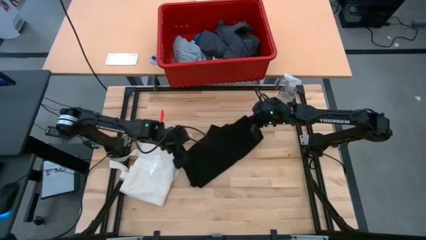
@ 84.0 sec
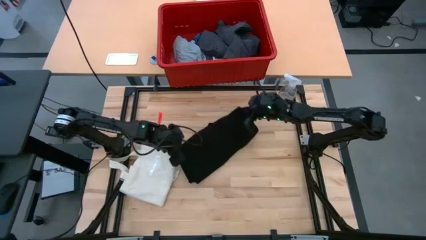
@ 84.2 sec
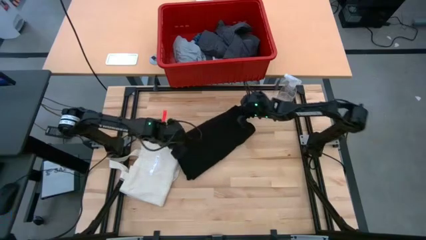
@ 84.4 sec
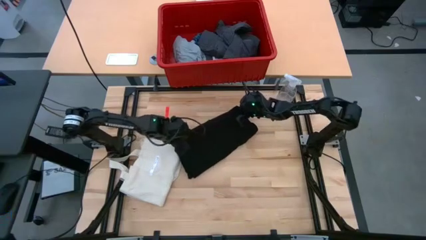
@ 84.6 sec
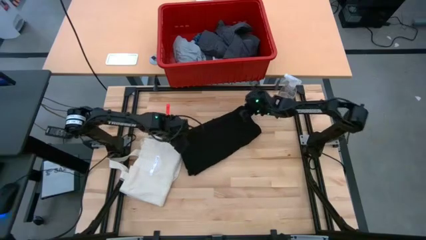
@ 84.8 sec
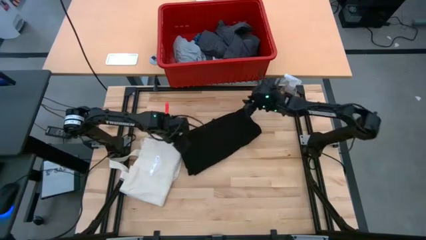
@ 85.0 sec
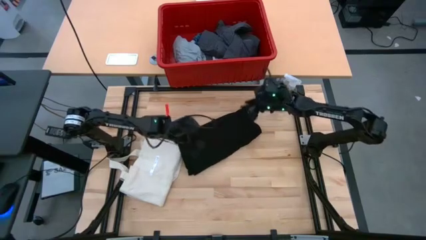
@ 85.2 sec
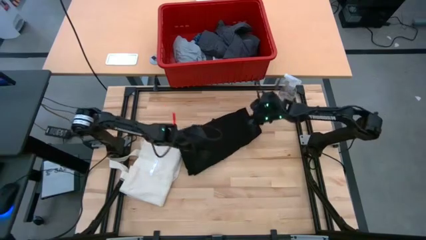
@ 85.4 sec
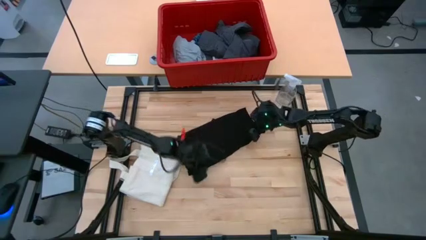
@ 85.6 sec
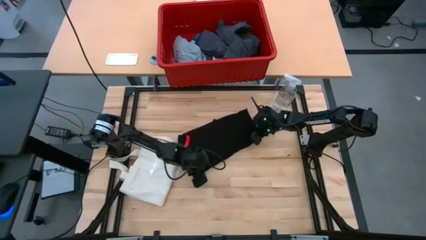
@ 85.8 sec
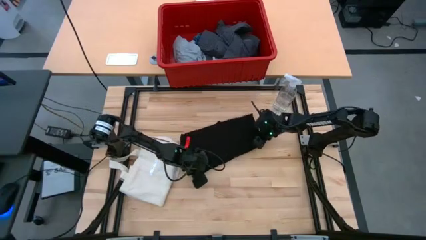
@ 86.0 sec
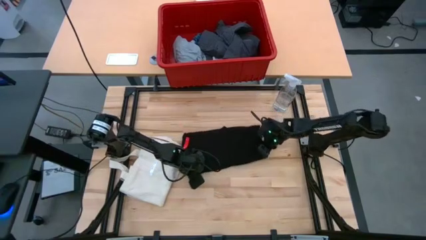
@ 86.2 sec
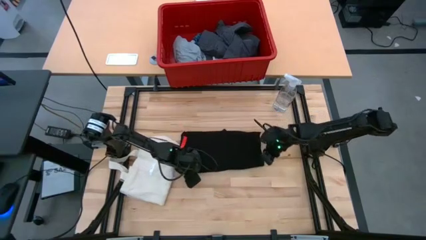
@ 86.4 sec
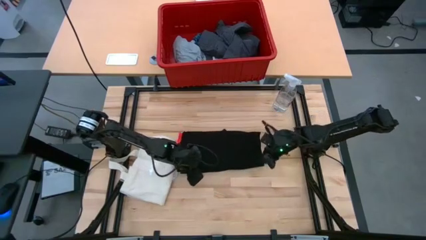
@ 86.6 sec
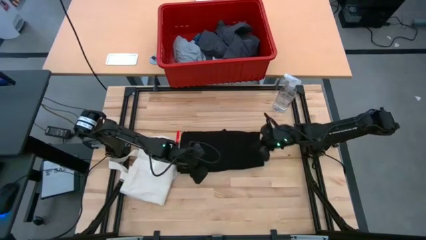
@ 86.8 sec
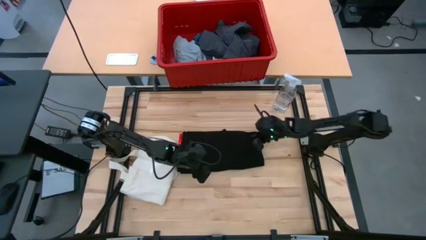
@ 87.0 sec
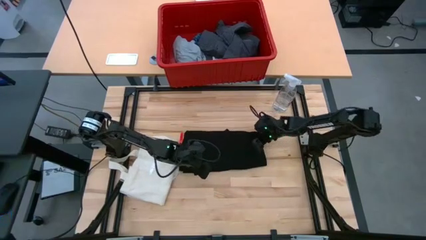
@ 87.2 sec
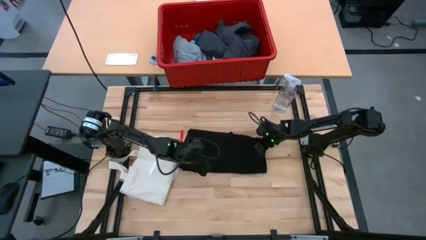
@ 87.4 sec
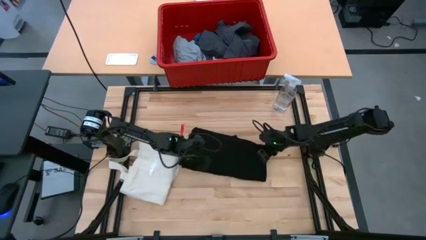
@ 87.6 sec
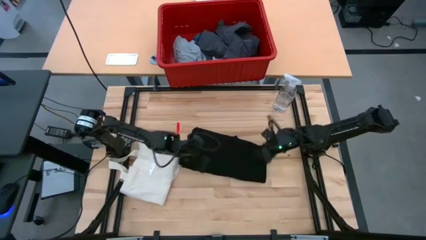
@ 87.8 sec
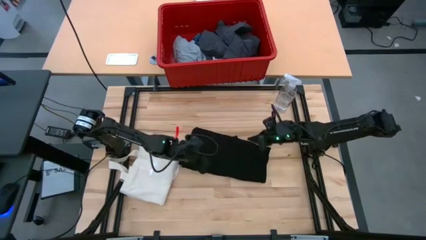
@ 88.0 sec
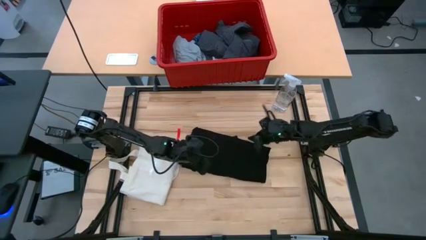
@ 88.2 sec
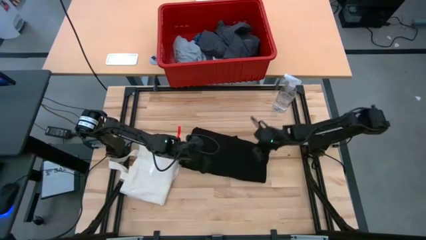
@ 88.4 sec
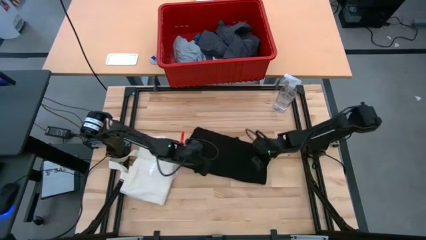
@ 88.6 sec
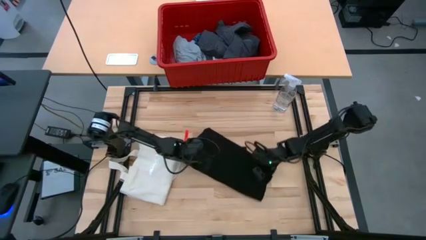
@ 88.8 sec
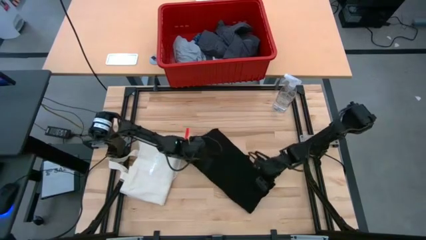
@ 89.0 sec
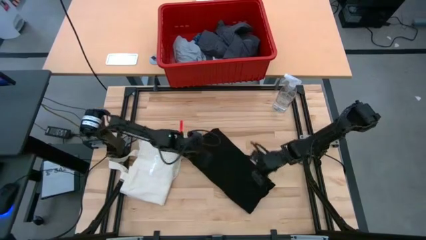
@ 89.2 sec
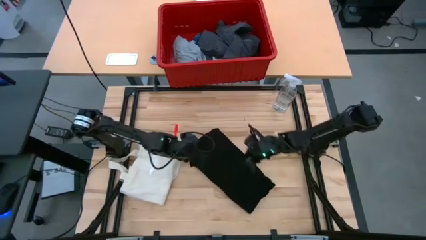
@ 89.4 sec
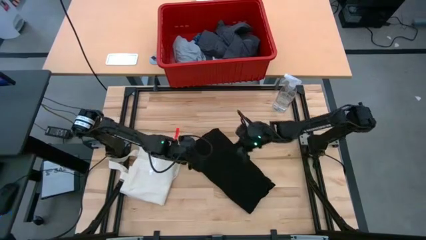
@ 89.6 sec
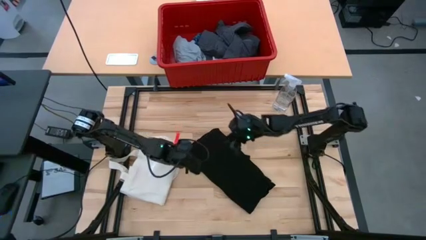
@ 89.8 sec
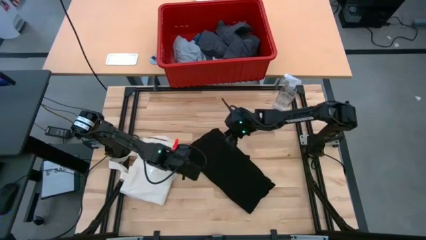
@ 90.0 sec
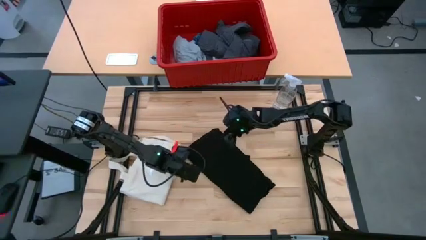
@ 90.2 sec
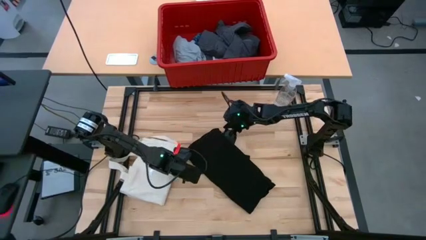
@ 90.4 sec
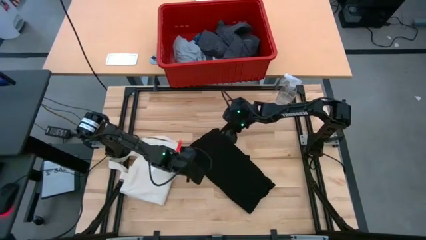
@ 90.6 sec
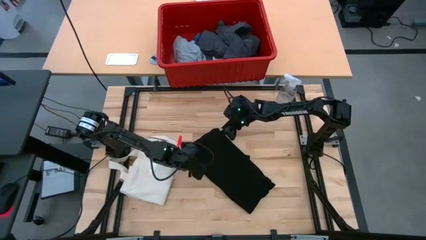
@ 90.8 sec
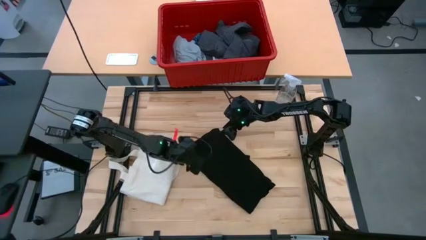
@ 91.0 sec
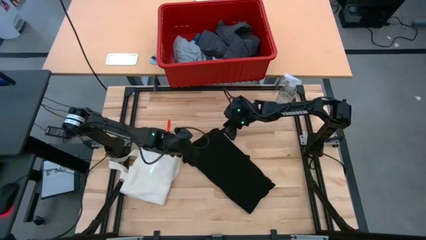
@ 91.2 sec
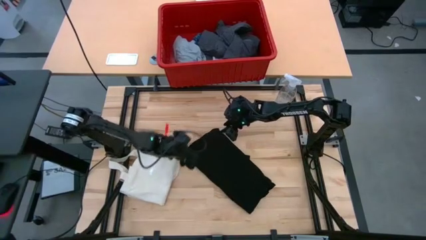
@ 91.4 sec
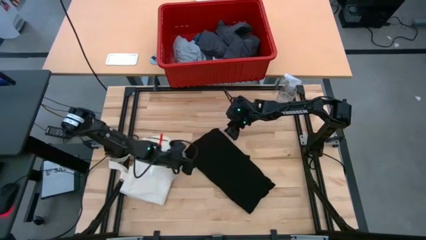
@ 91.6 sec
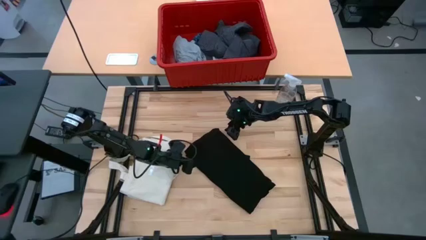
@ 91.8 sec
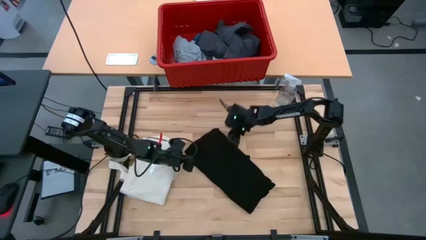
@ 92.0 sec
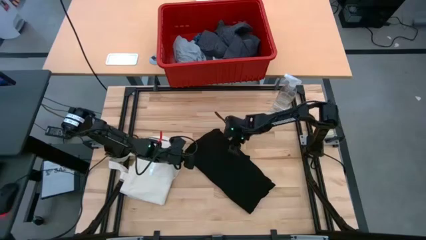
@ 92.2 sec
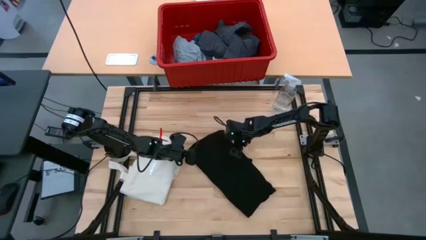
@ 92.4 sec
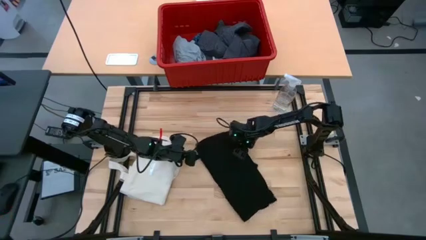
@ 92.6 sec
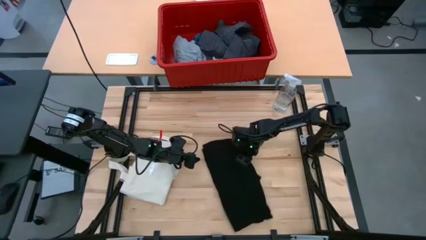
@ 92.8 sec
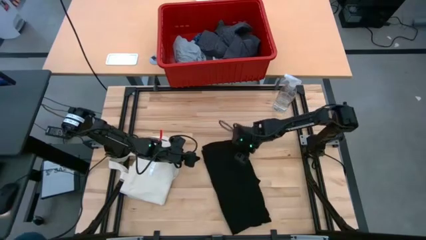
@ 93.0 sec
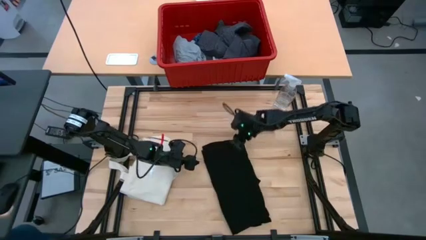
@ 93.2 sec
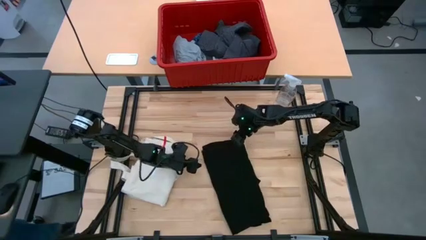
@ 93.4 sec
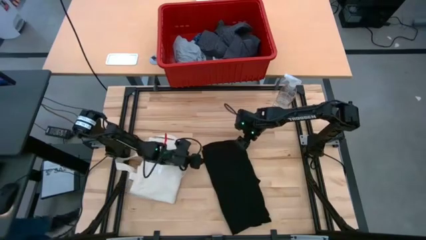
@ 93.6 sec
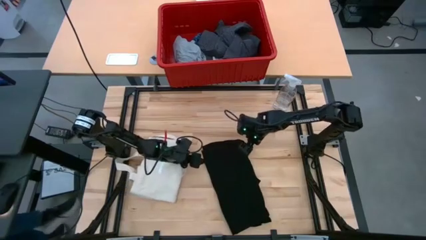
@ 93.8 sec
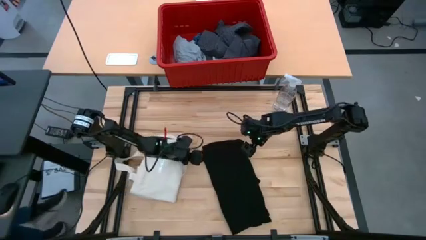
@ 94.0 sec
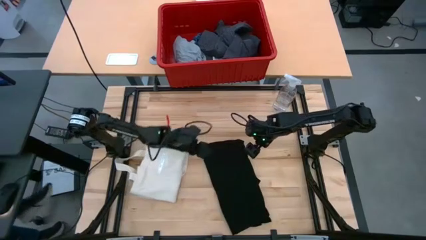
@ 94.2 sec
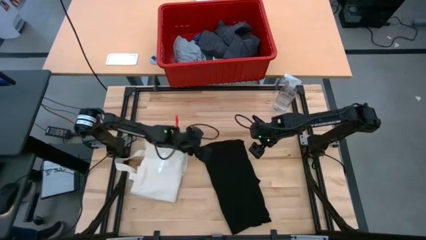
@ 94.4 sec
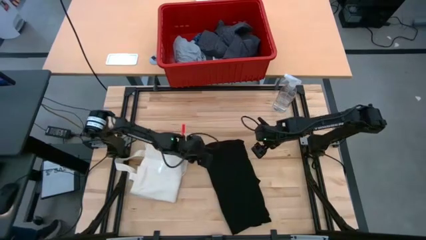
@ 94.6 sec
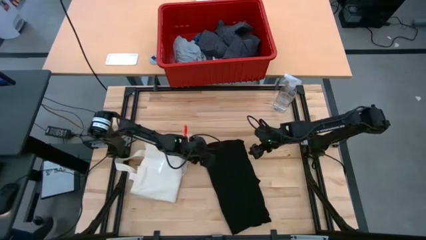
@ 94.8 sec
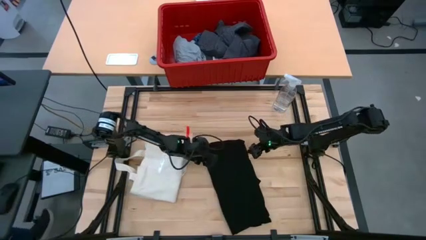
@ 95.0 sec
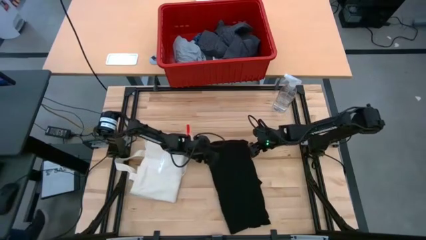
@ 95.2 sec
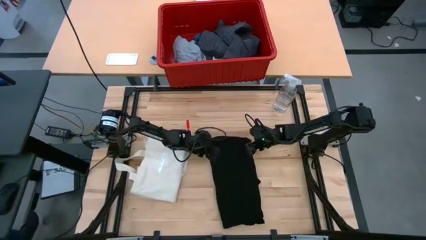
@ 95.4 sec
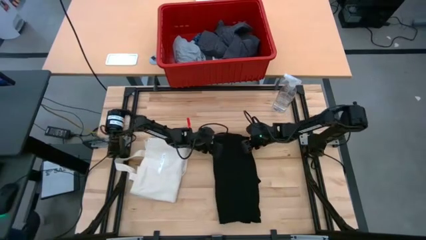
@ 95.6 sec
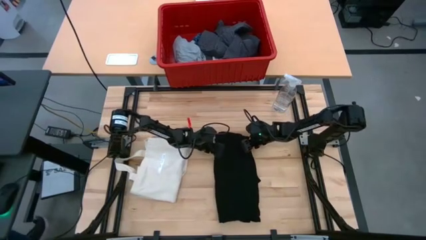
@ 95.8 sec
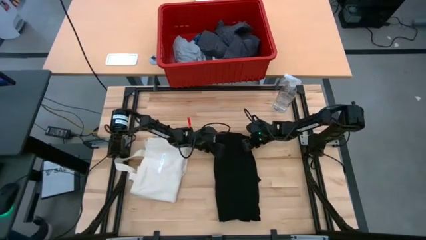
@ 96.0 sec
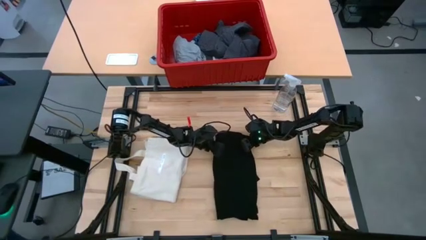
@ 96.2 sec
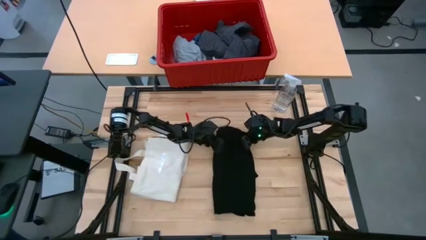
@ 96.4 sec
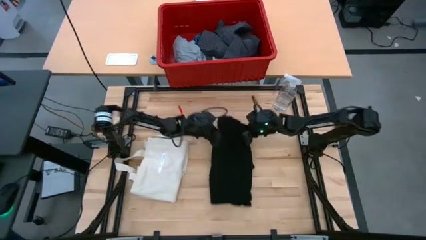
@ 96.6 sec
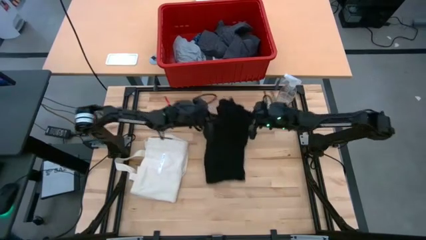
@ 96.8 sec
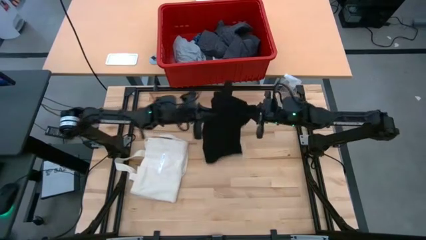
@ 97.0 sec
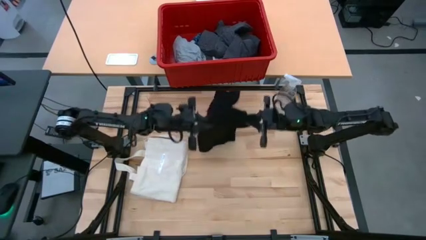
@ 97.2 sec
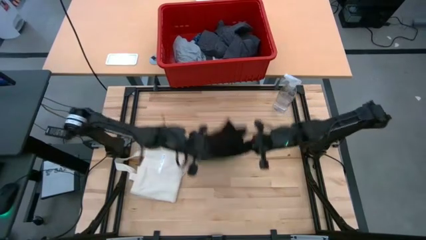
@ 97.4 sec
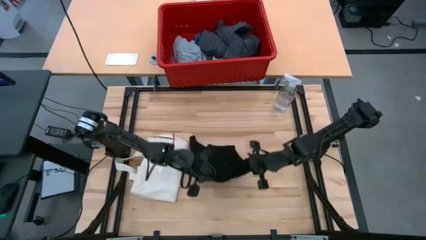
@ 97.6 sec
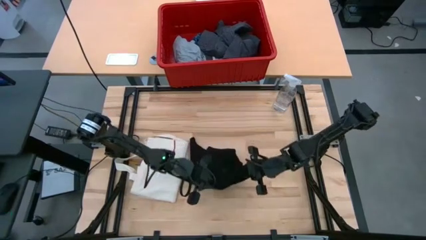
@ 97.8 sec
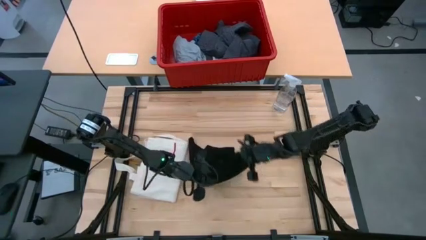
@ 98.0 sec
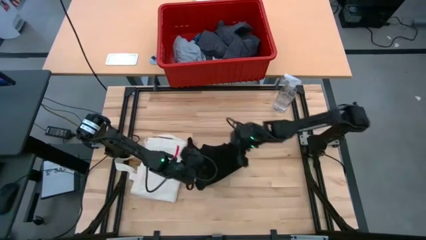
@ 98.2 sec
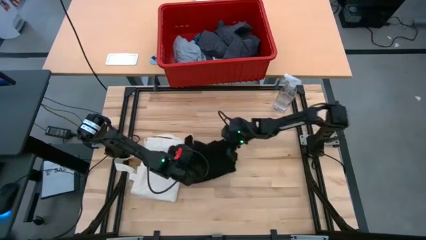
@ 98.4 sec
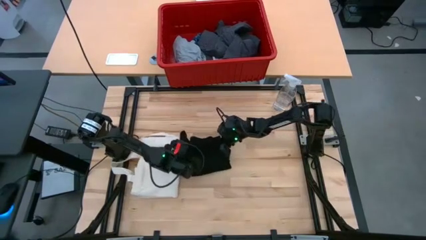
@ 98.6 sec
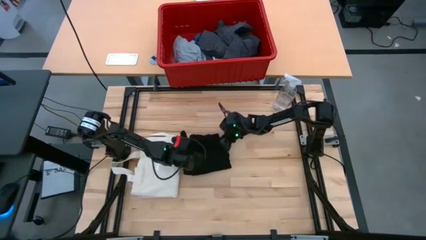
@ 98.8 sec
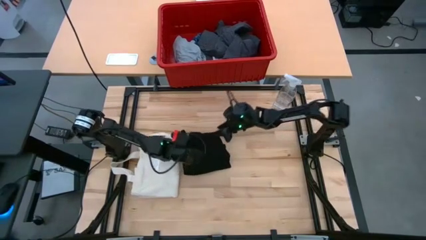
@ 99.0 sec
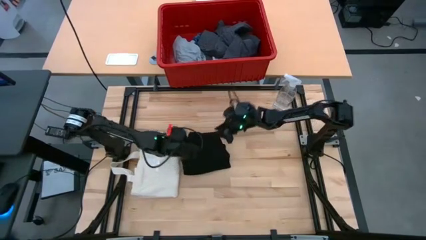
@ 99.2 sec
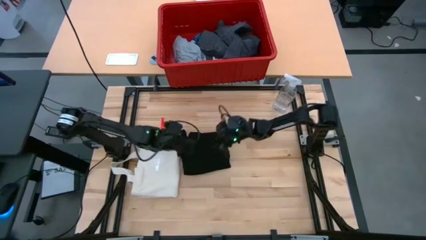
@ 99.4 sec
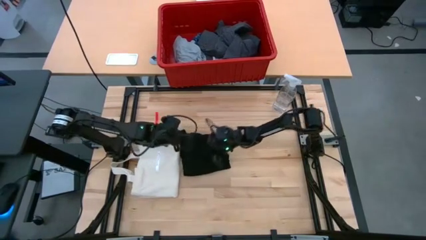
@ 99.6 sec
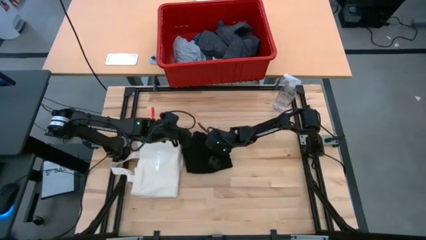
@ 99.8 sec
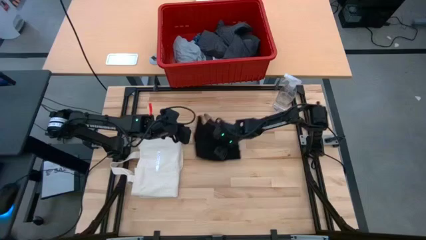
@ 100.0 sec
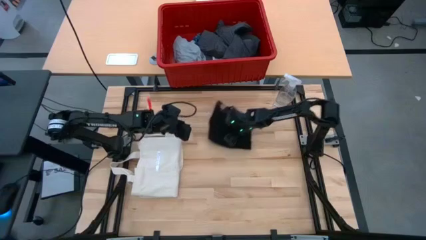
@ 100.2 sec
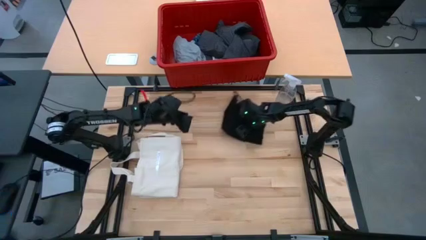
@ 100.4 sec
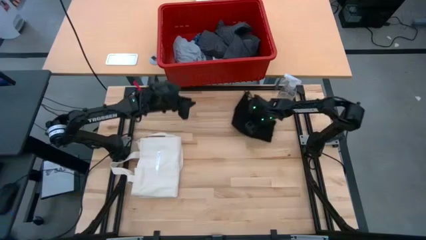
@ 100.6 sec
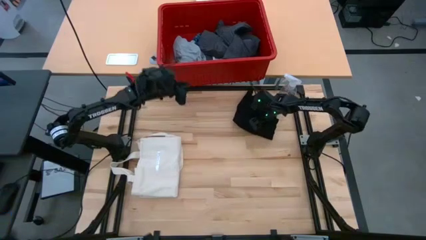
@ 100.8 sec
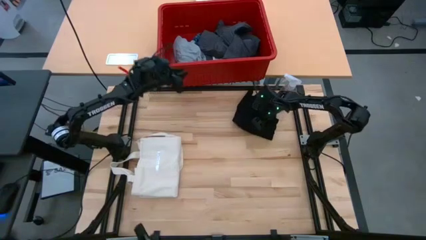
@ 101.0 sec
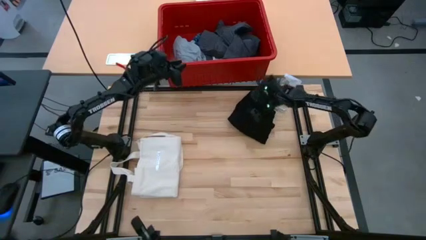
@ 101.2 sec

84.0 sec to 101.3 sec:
Task: Fold Laundry from Bin
Fold the black shirt
